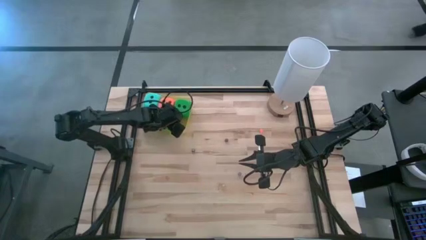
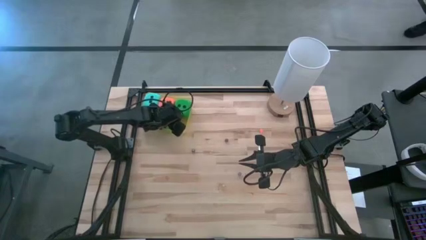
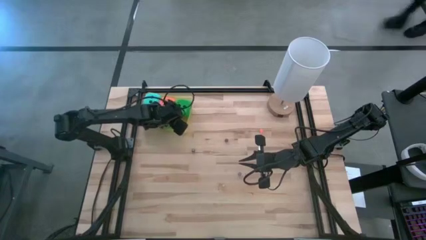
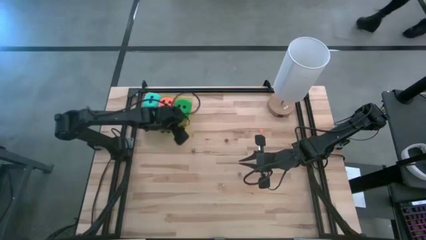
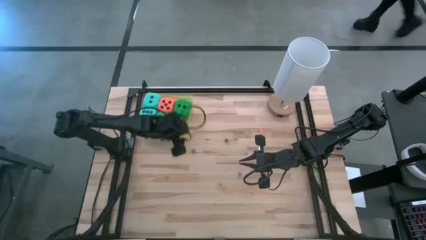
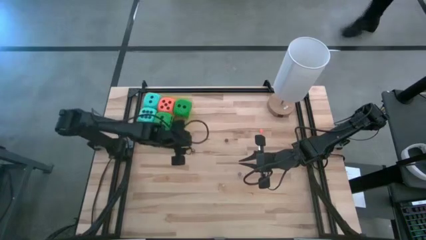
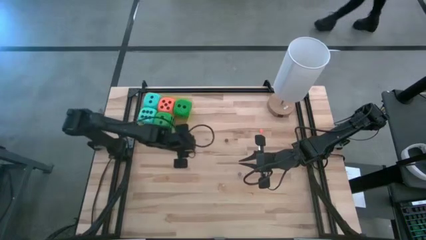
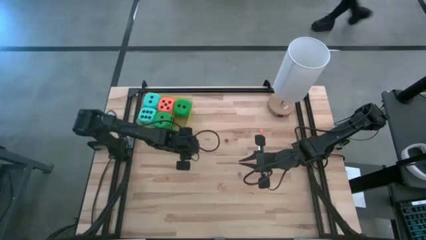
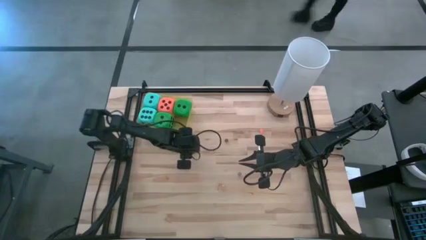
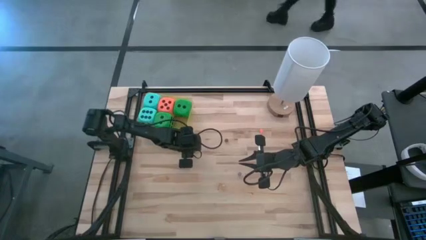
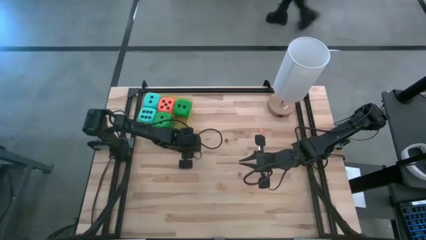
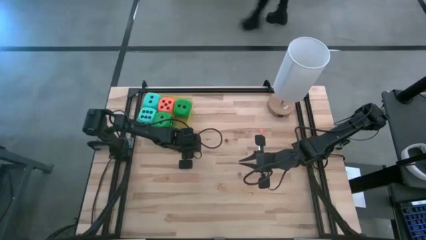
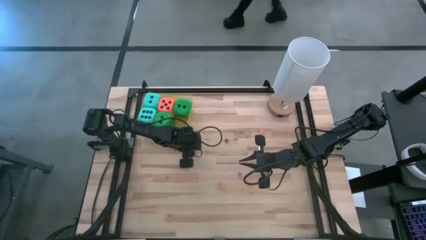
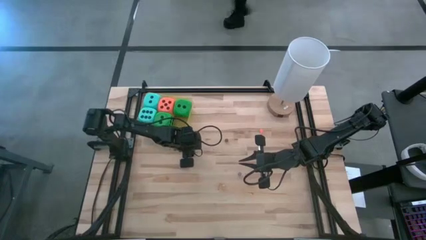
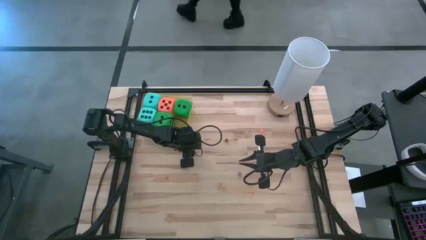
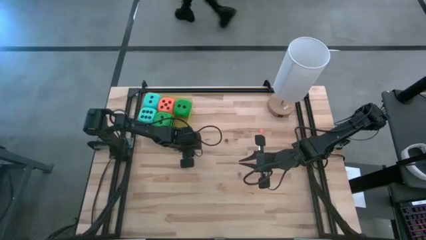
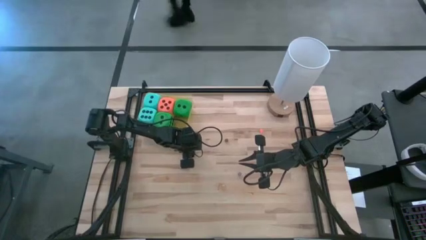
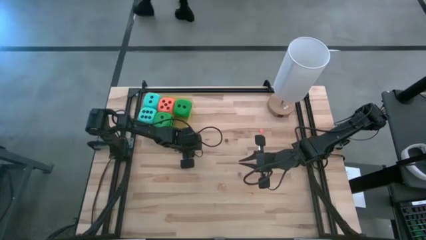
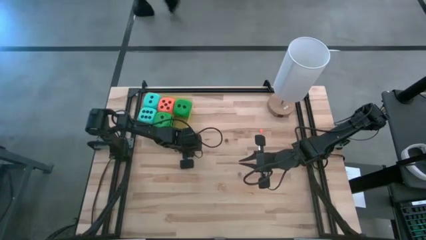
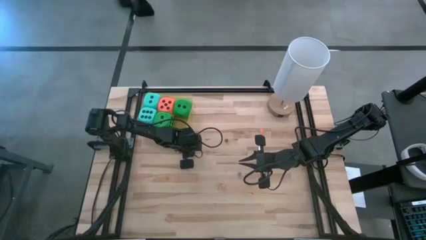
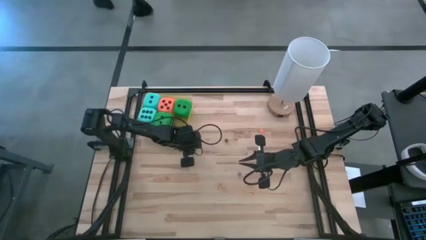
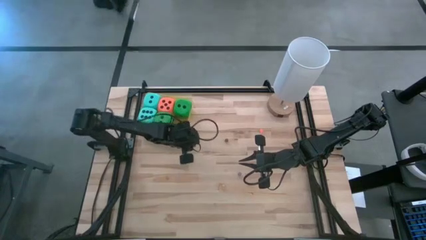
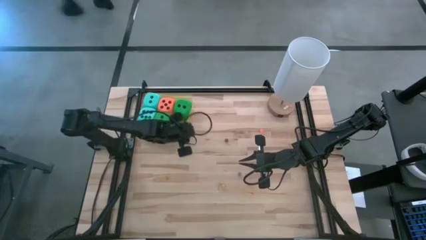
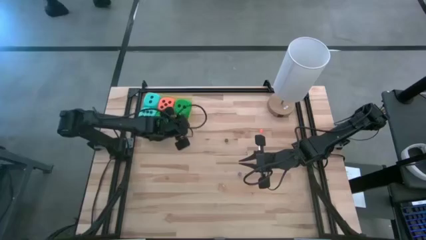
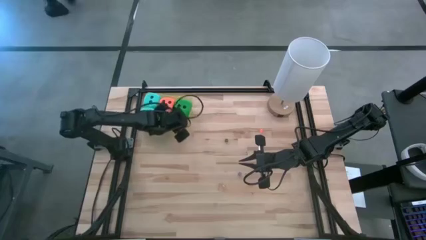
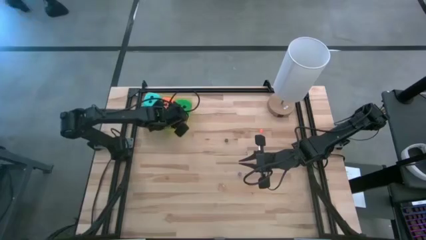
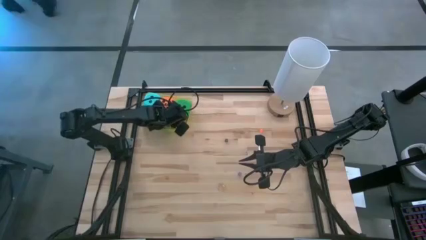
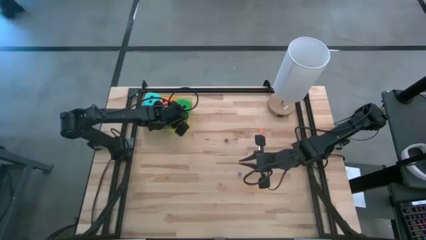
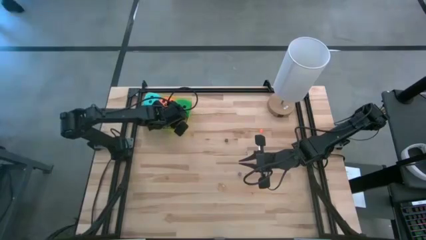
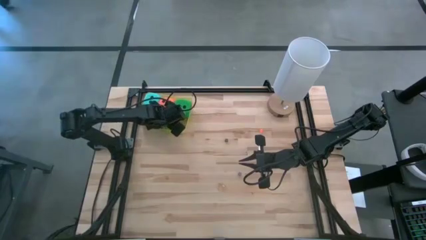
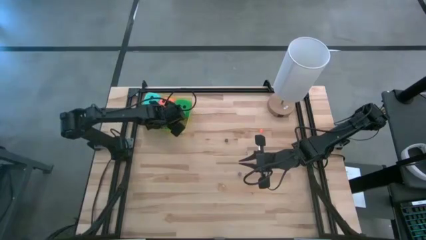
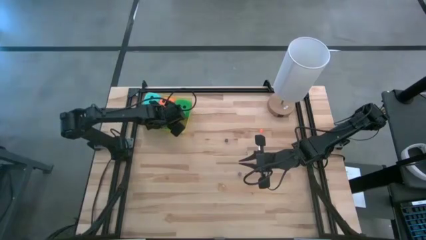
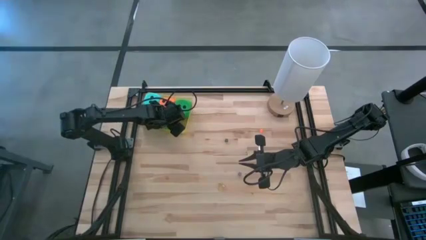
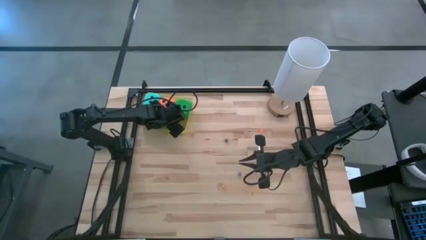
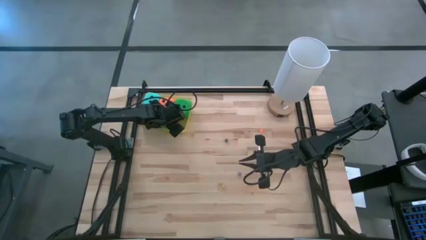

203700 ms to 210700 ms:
Task: Pick & Place Dice
Put the left black small die into the yellow container

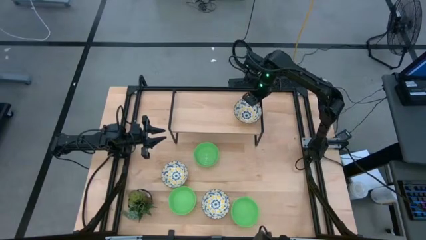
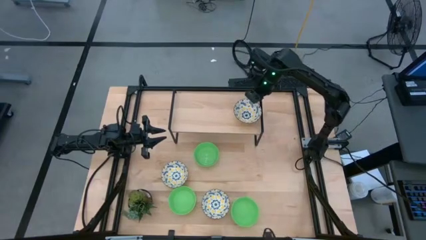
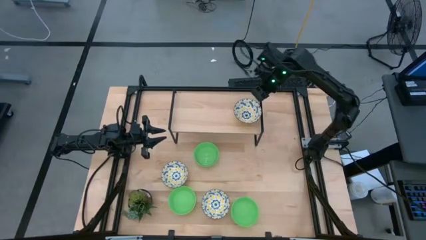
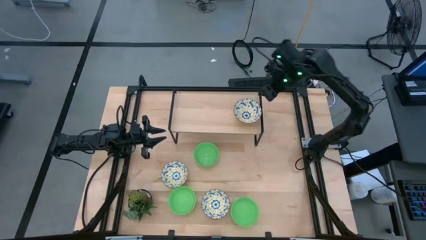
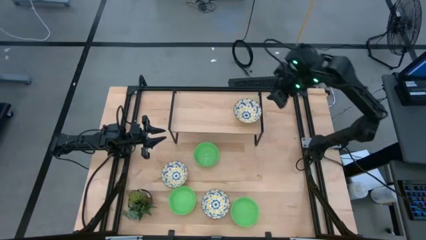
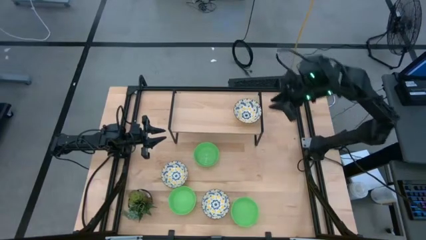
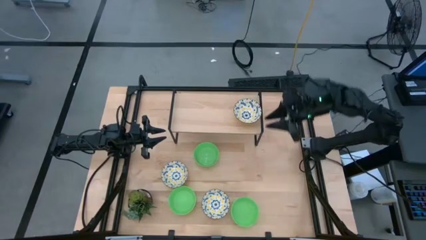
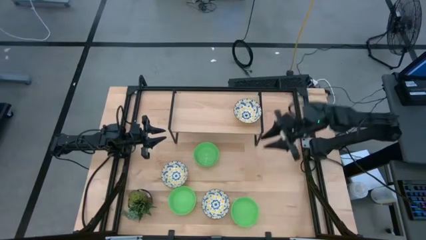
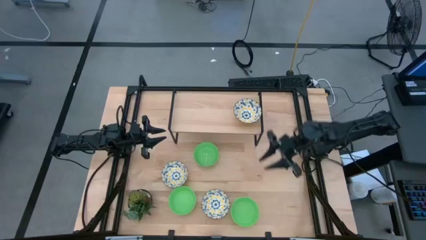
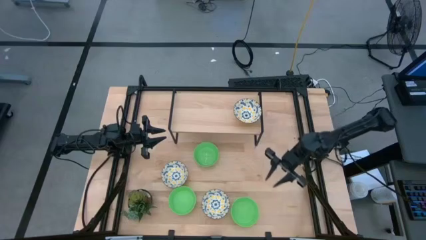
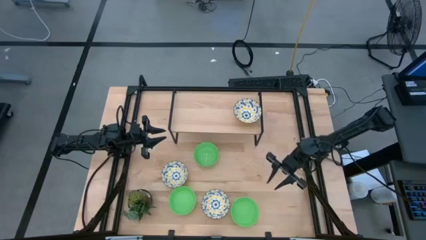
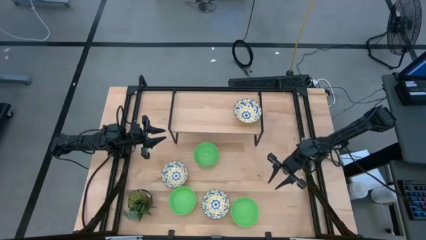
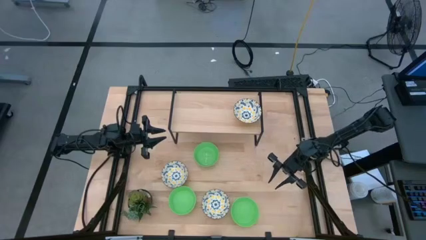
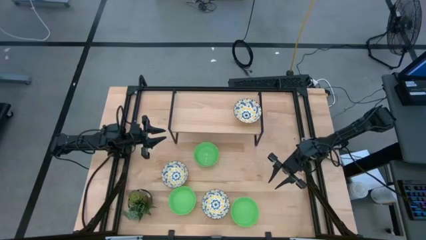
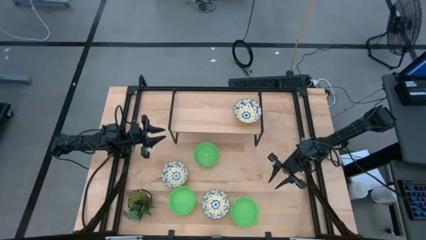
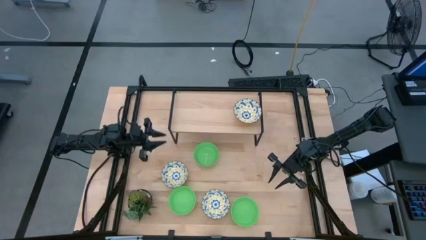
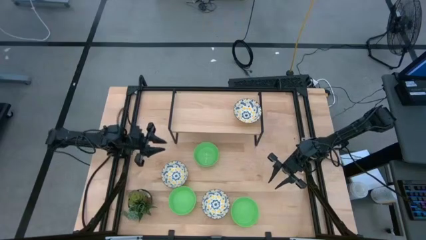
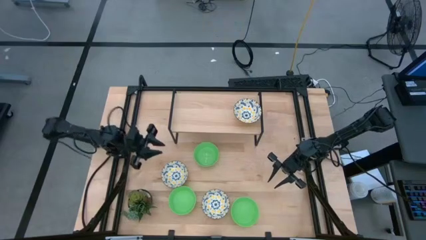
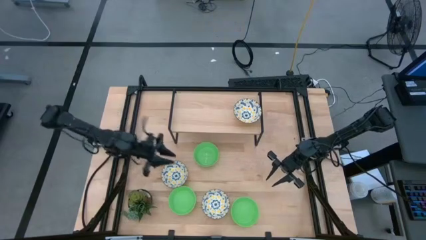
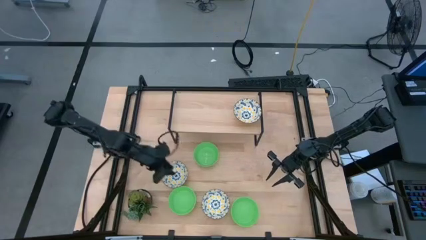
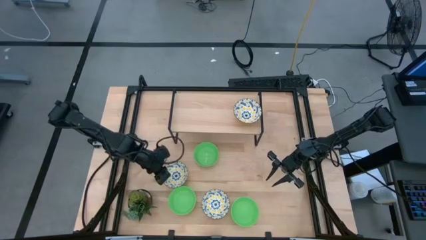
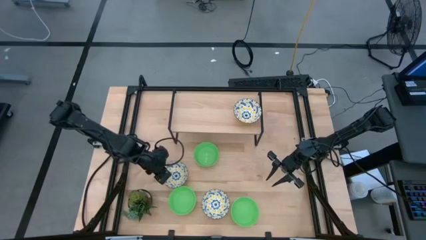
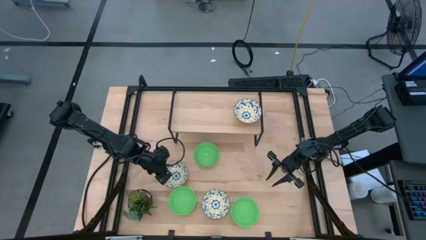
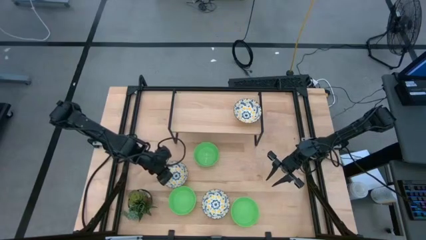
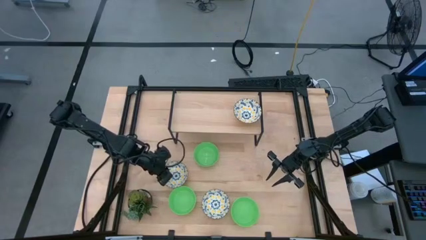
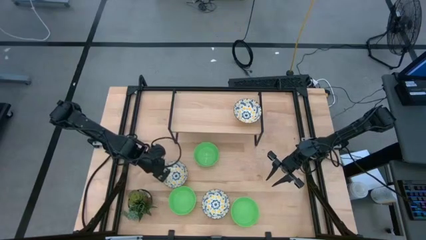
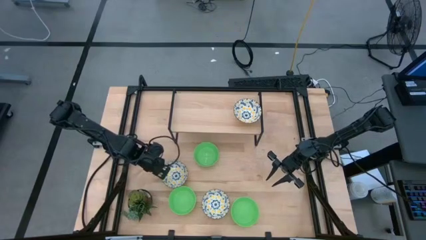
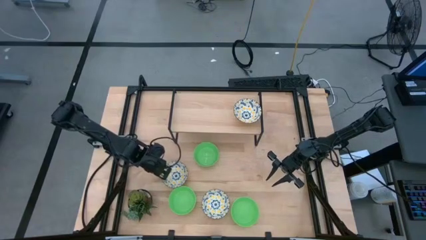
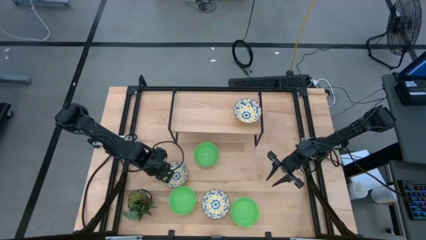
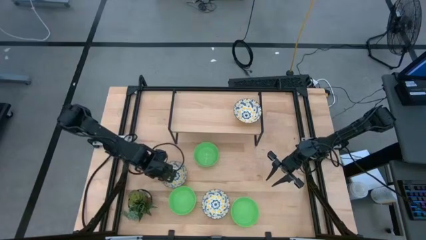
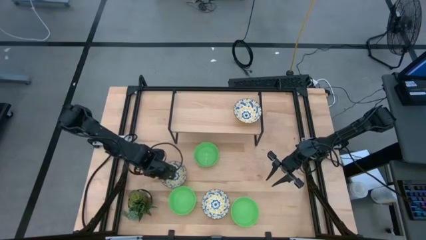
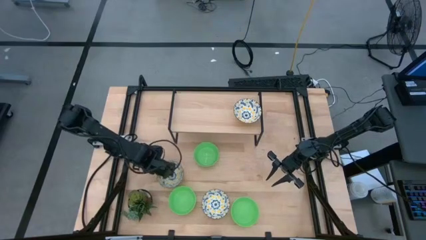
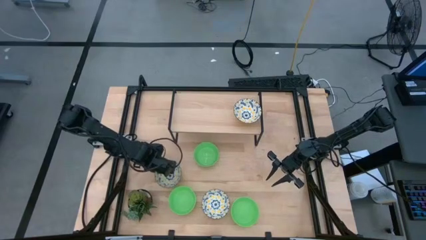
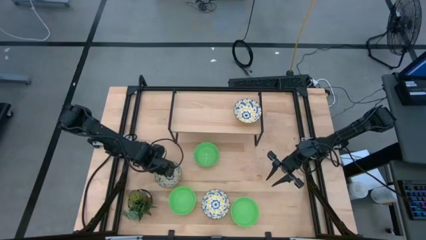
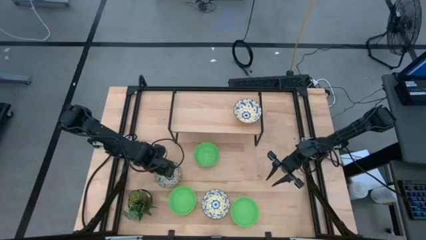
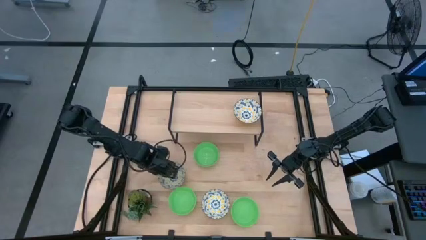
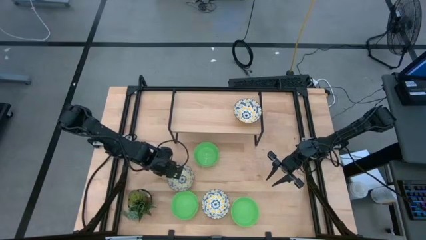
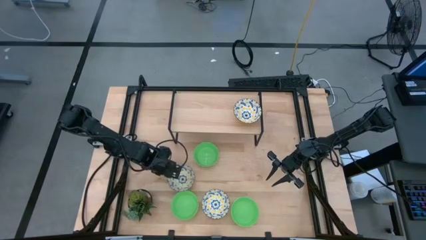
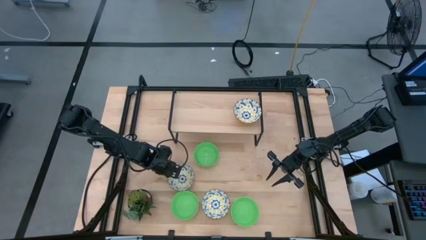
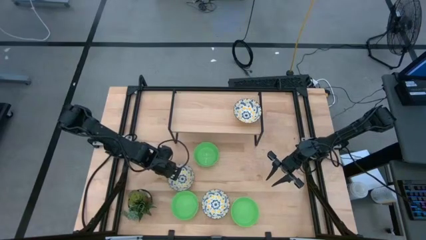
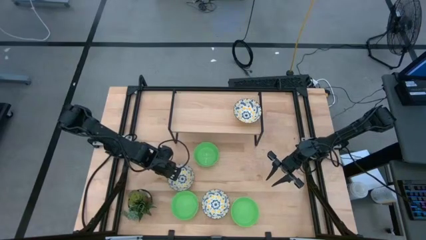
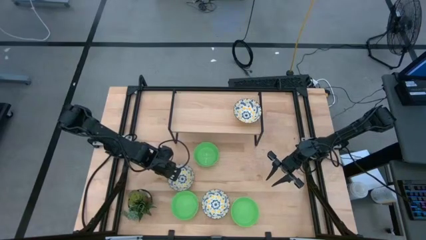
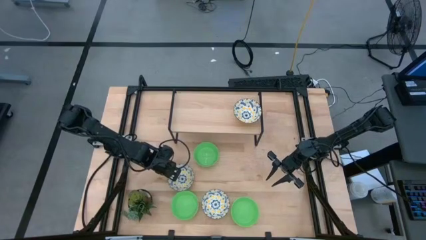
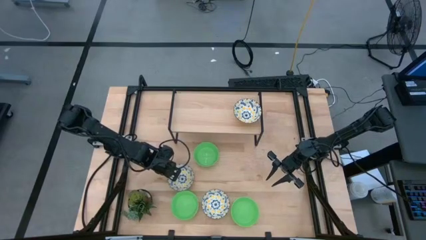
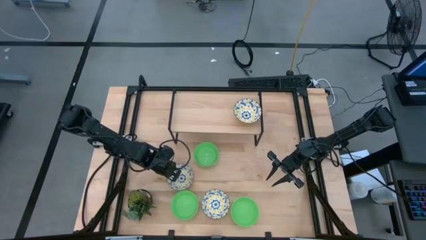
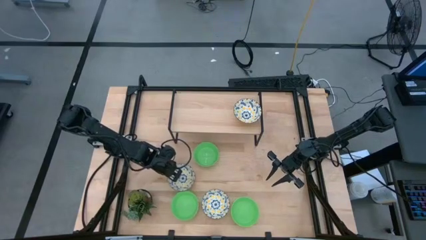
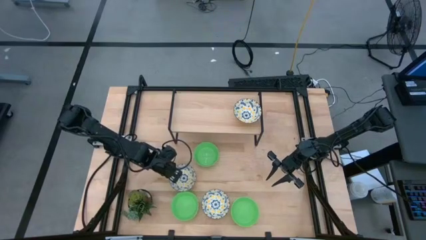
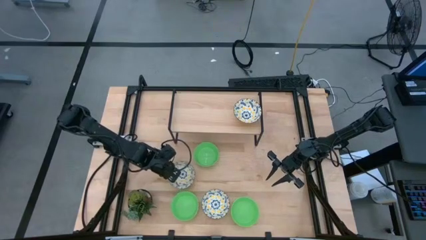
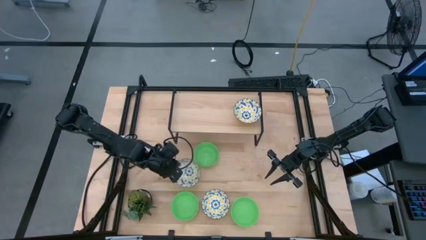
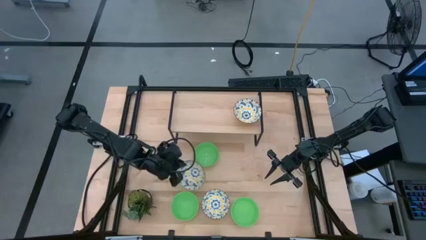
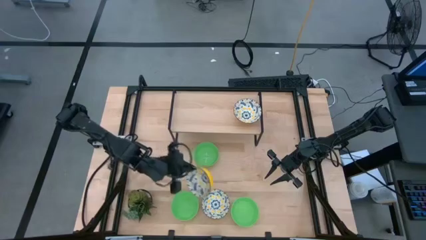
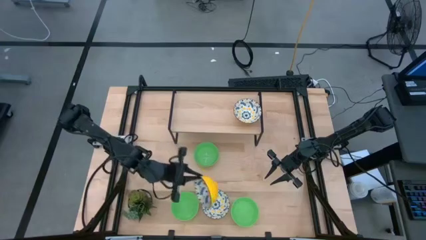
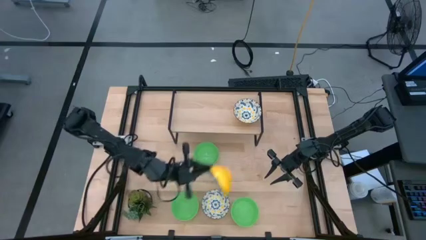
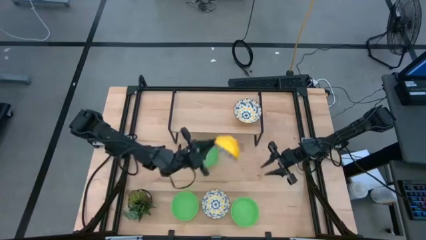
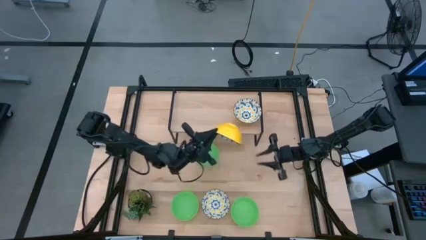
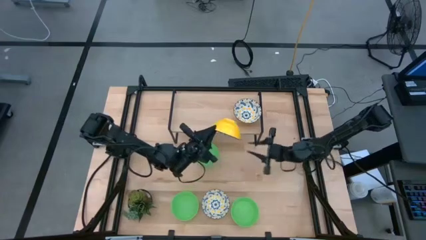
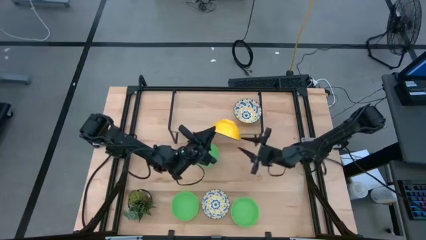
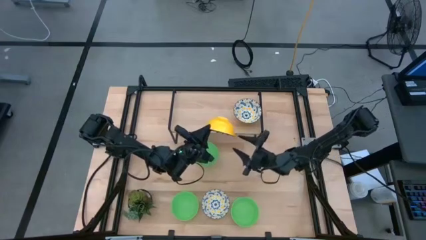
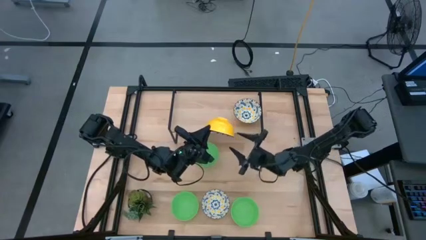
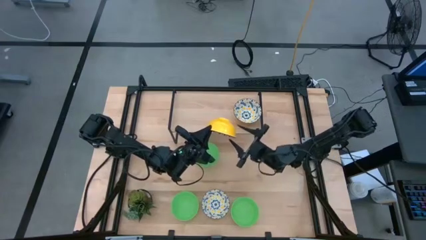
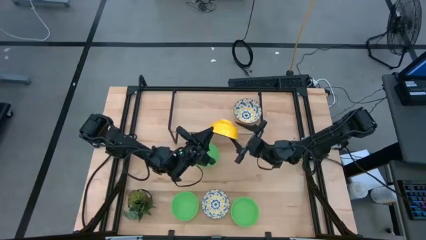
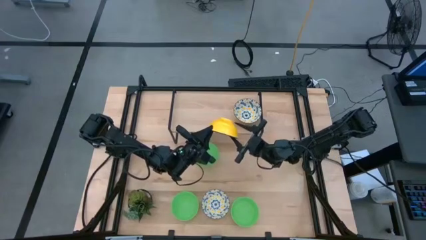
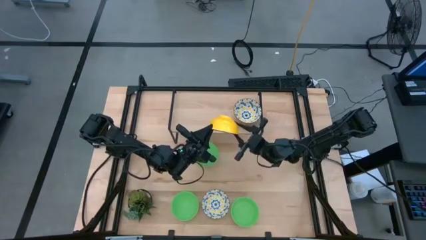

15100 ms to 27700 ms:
Task: Pick & Place Mini bowls
Stack the top white bowl on top of the white bowl on the shelf
